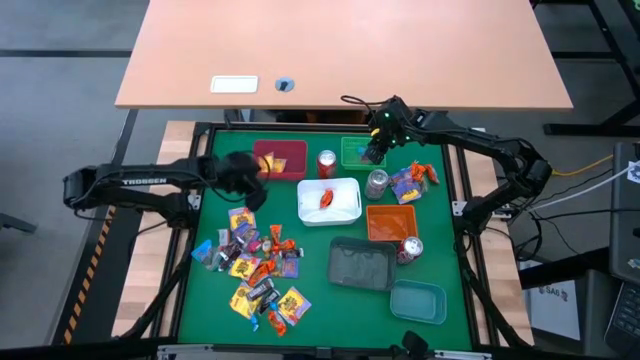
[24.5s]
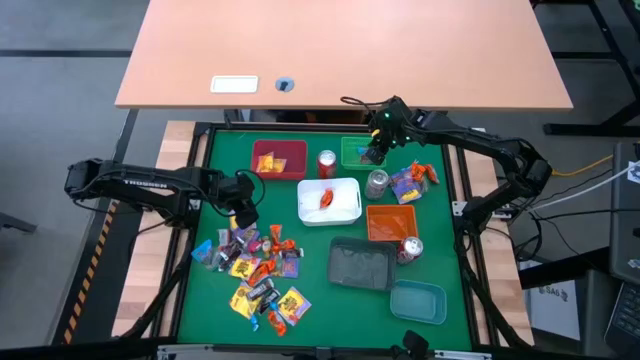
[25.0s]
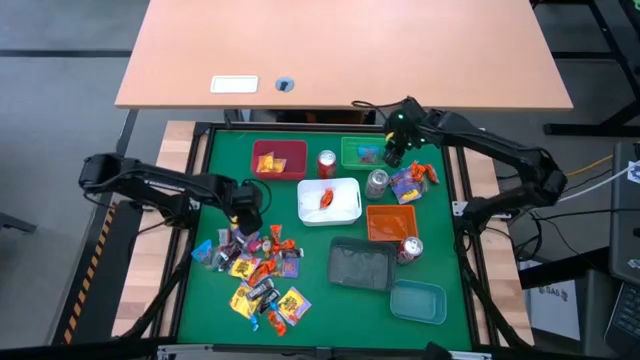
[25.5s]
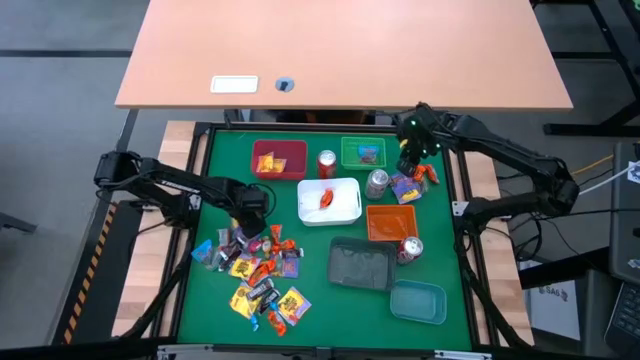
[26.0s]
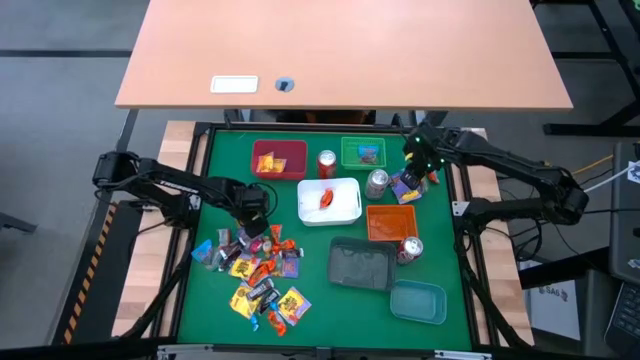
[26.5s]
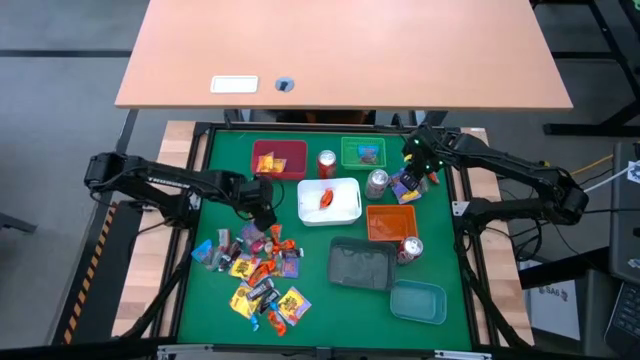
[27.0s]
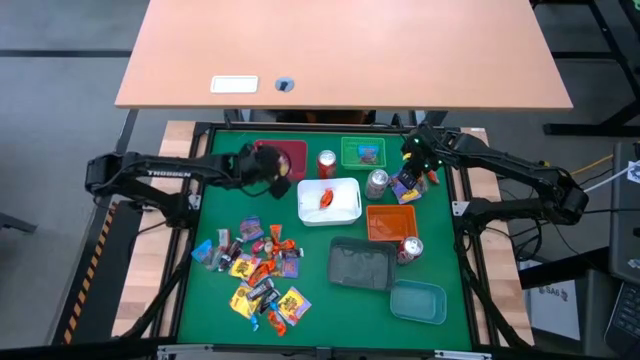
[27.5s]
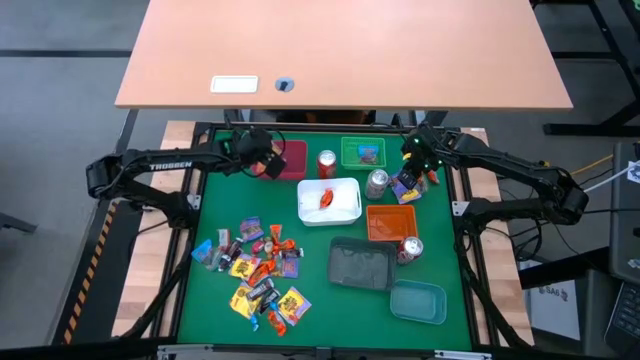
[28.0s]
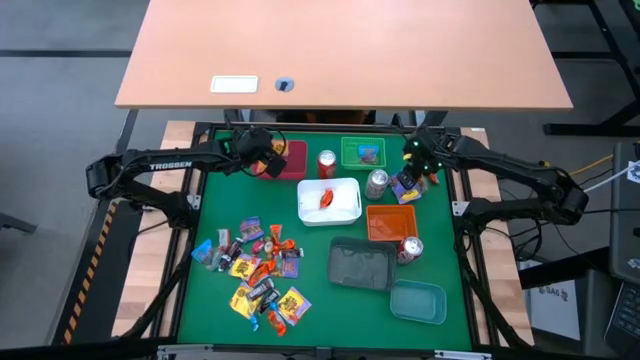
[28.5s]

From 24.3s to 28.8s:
Task: Sort candy
Put the yellow candy into the red bin

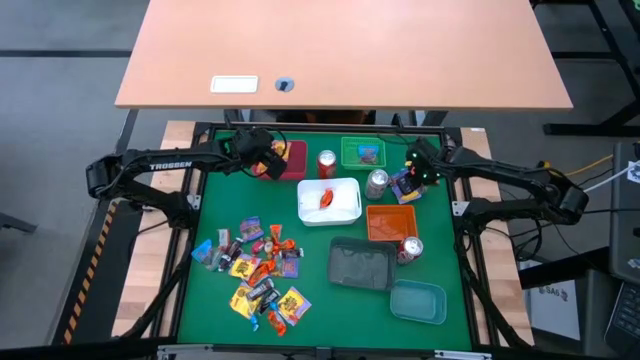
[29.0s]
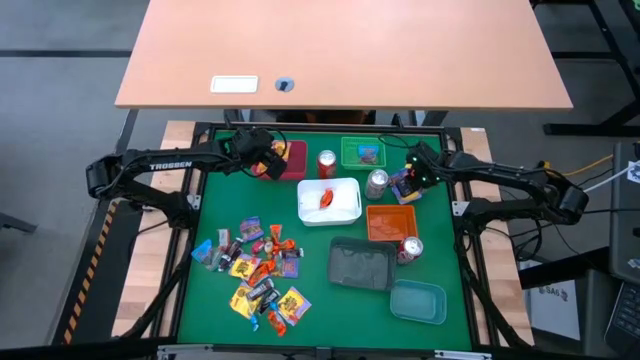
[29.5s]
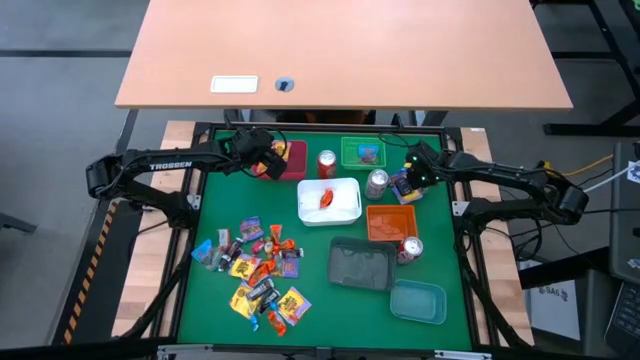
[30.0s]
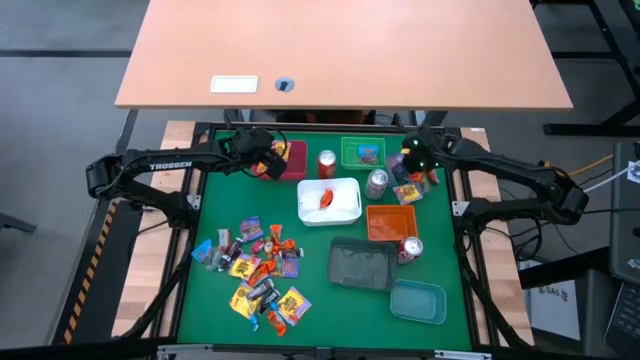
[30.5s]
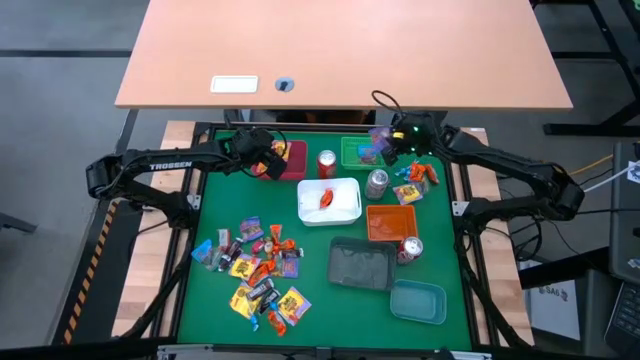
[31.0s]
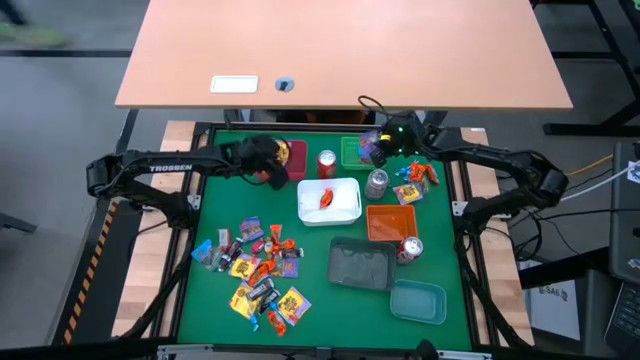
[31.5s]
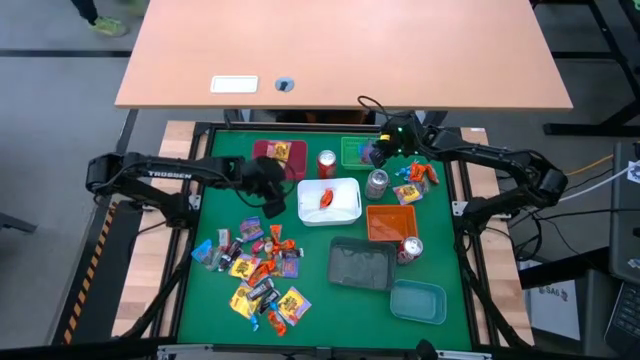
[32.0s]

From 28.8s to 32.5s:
Put the violet candy into the green bin

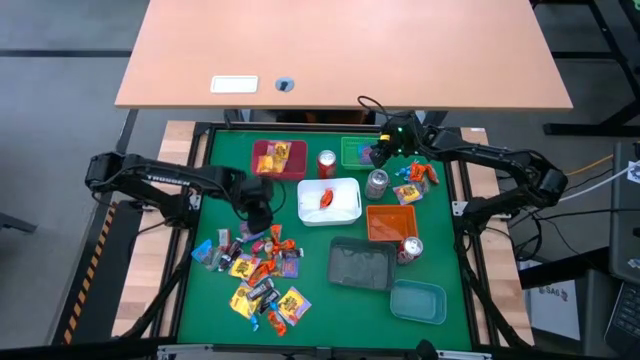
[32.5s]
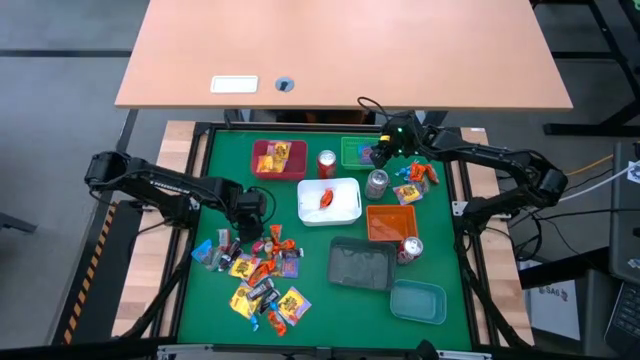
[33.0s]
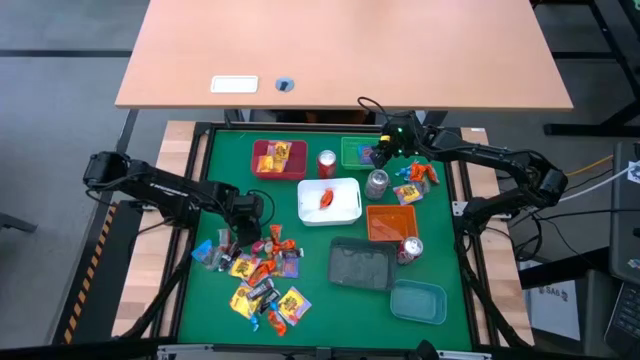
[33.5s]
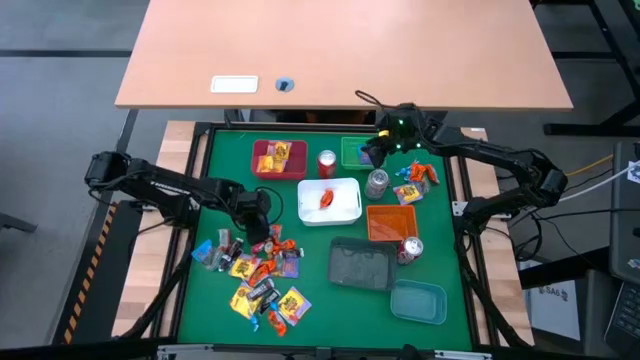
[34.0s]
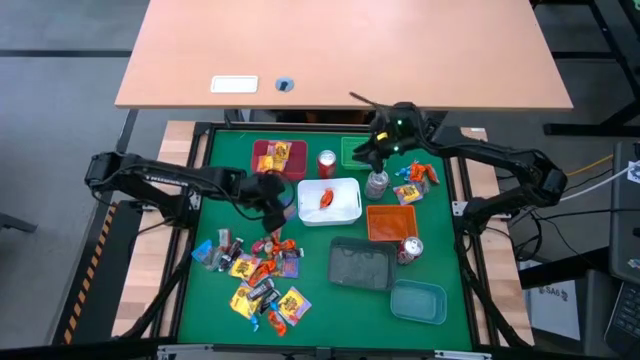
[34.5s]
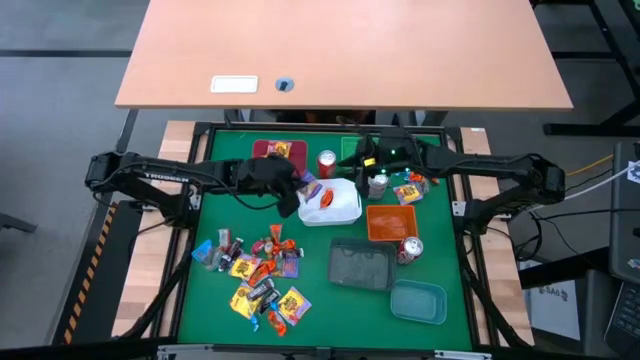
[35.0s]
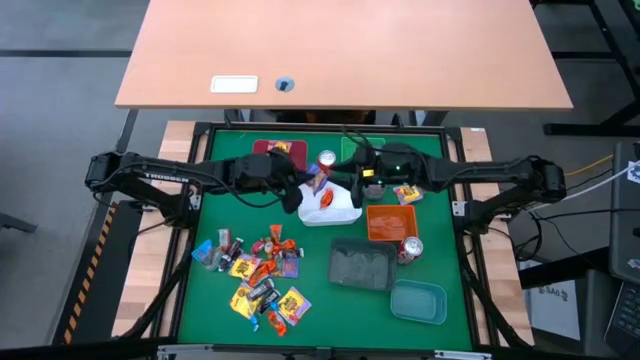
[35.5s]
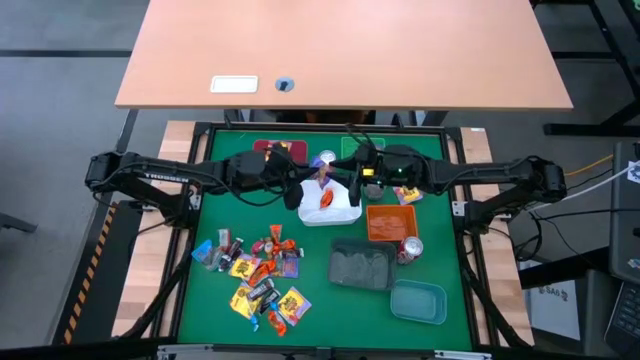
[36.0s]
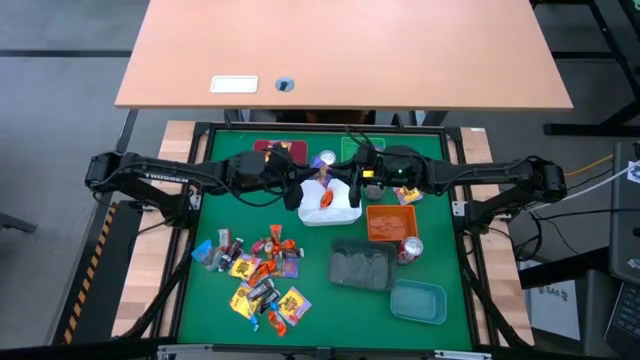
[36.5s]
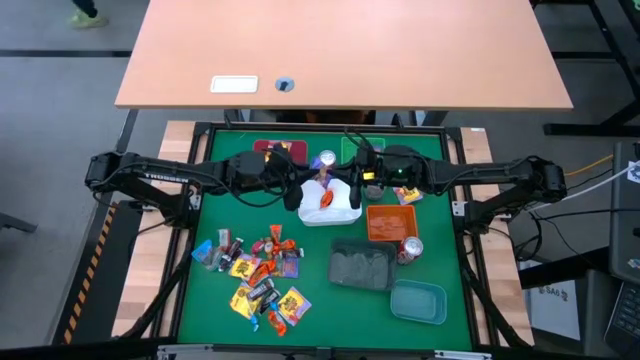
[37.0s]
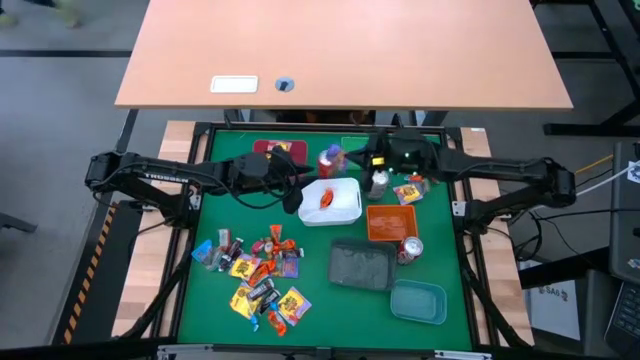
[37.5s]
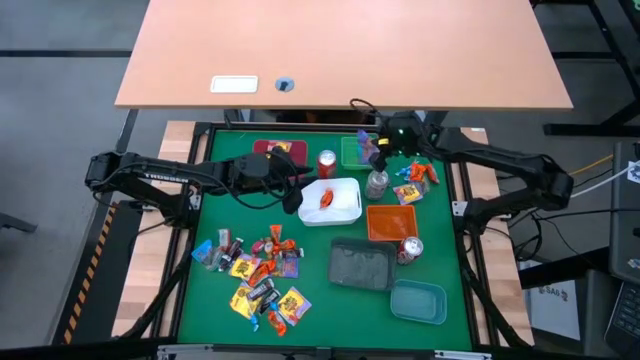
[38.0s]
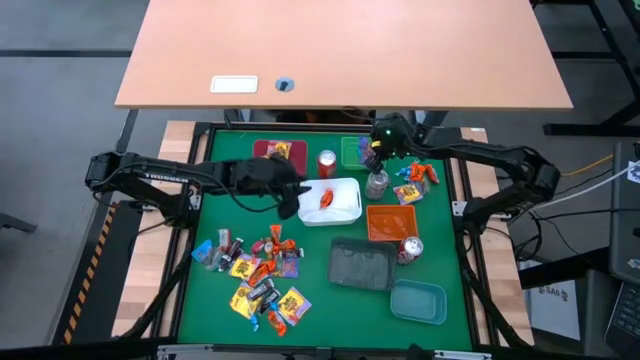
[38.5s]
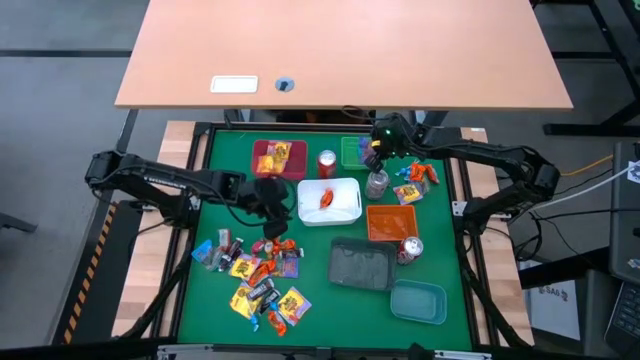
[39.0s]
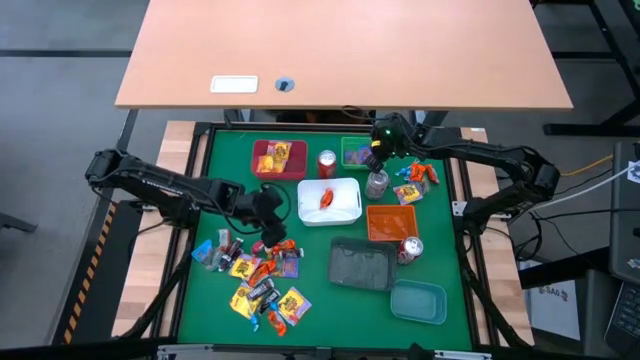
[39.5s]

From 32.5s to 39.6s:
Put the violet candy into the green bin

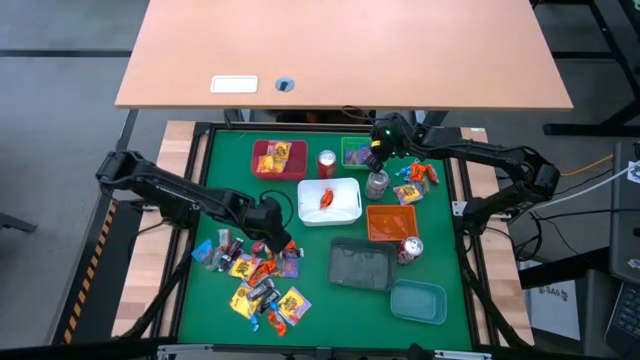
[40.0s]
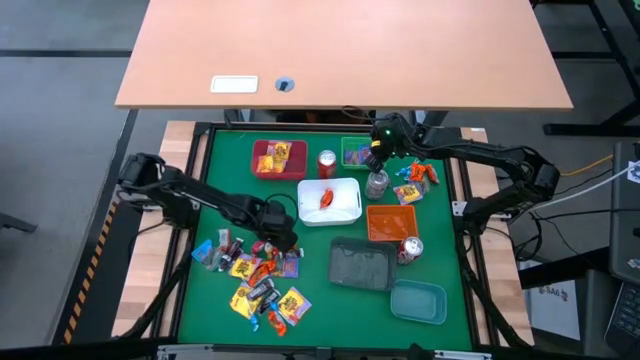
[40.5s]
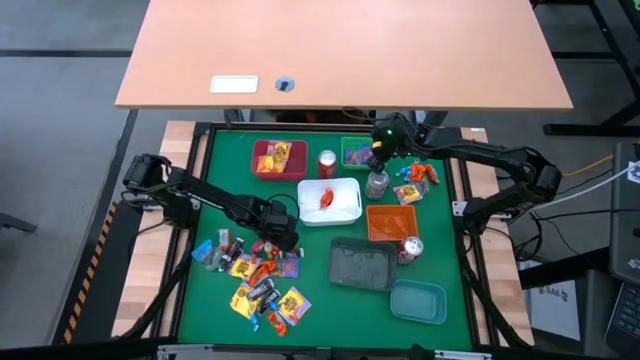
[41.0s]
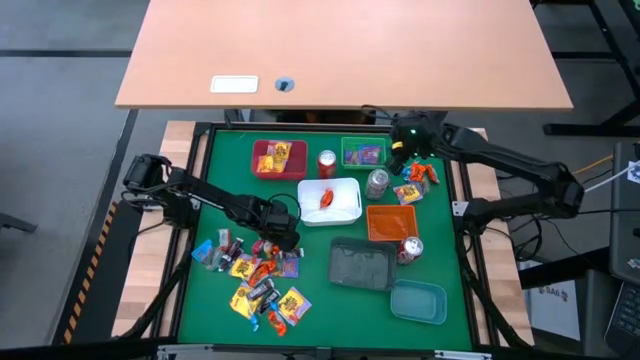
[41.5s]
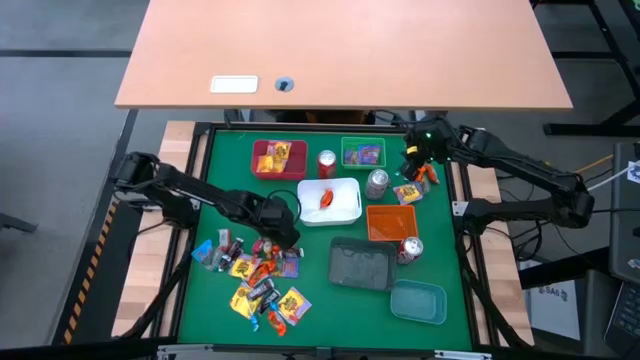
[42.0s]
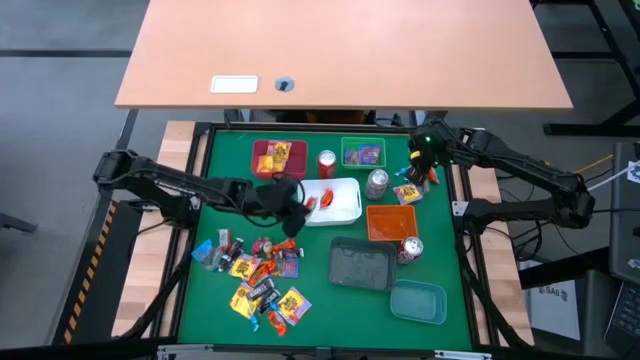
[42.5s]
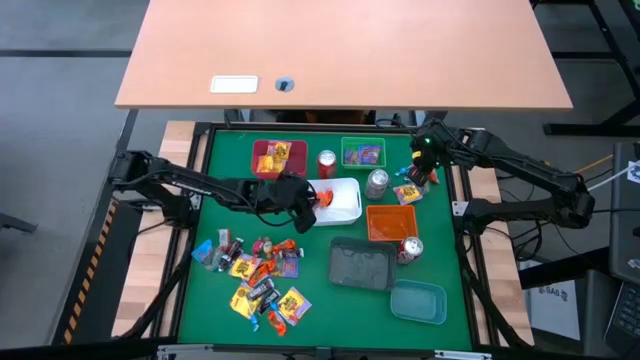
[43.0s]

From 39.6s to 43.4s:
Put the orange candy into the white bin

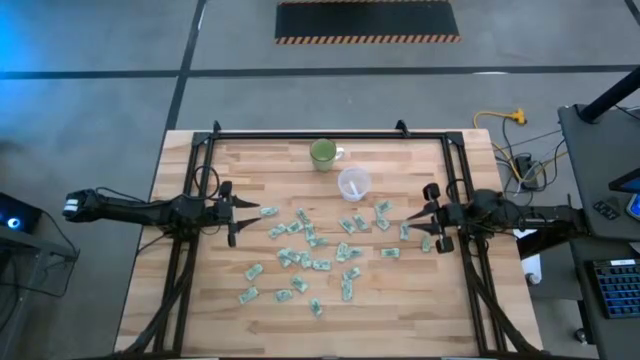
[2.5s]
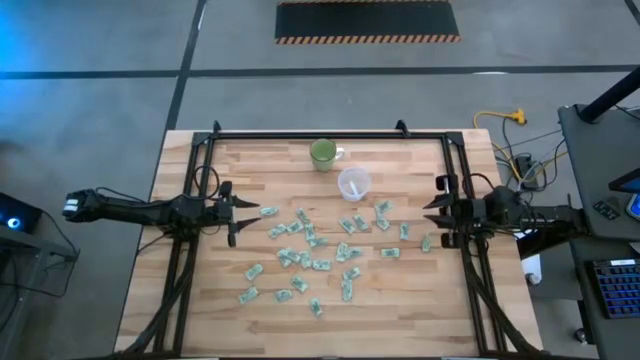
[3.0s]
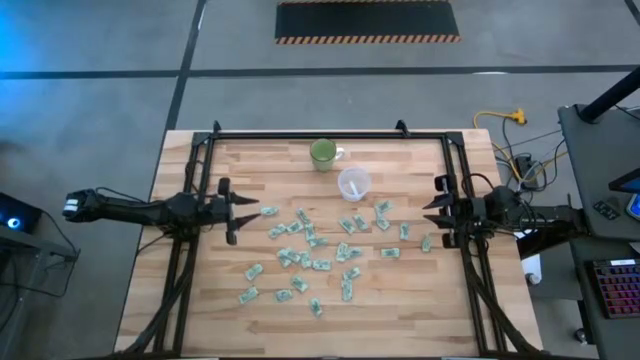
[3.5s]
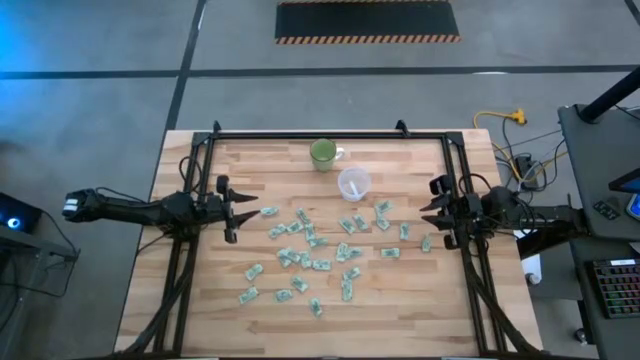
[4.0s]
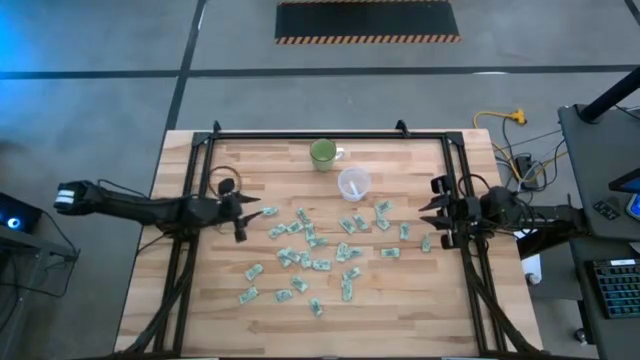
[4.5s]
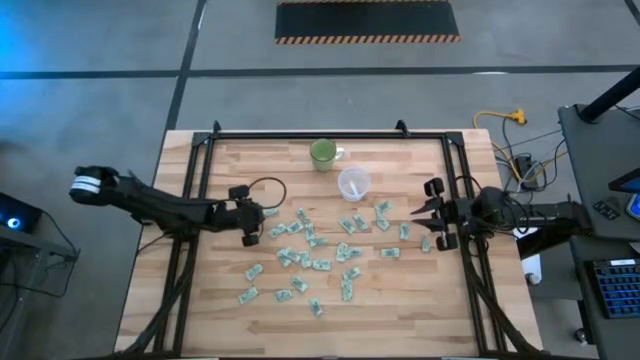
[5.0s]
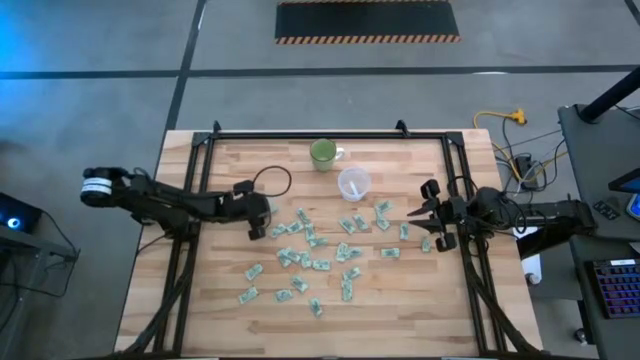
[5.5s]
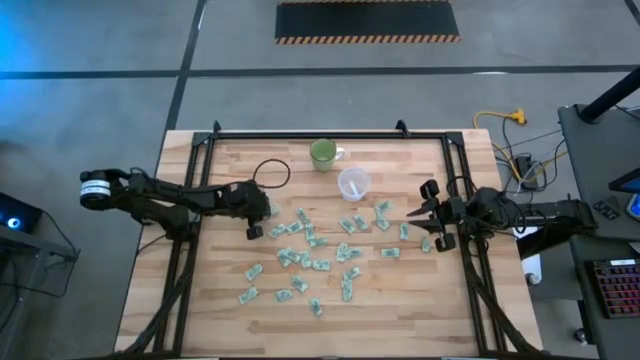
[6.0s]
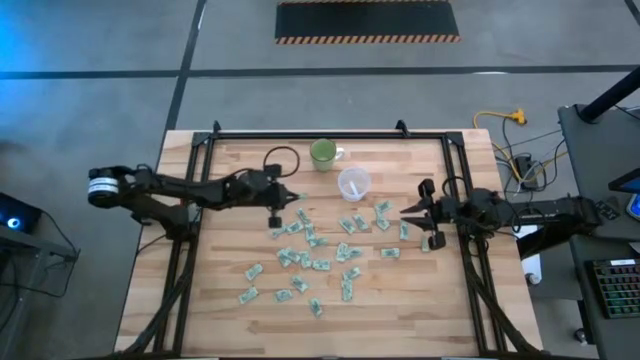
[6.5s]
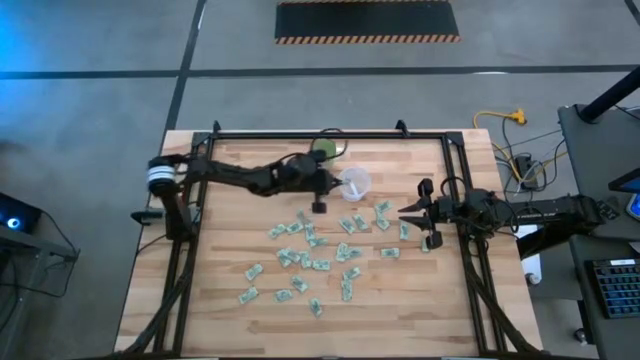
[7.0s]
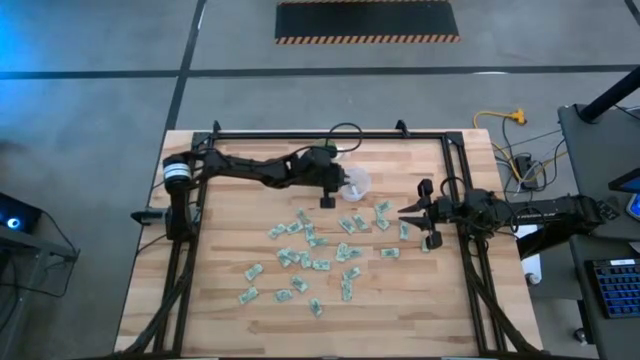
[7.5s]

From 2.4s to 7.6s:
Task: Pick and place Stevia / Truvia into bins
Put the stevia packet into the transparent container
